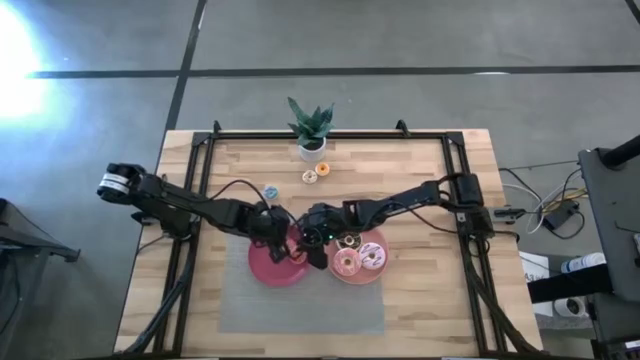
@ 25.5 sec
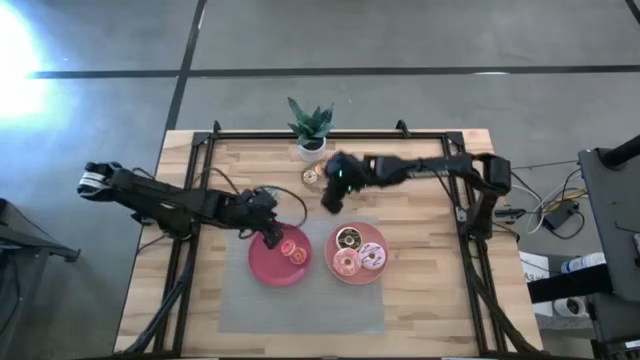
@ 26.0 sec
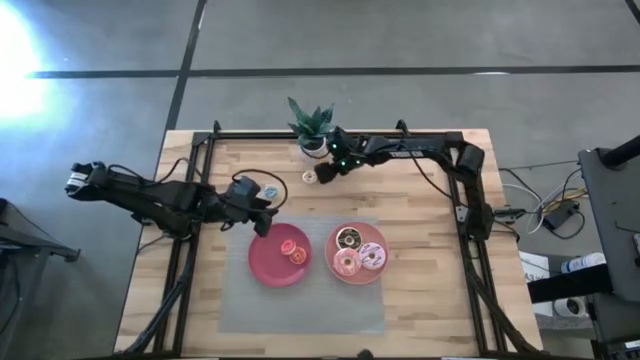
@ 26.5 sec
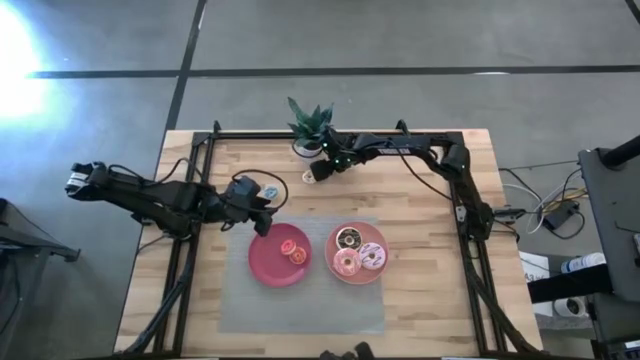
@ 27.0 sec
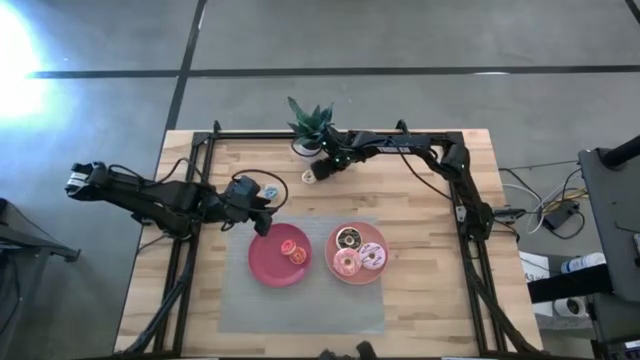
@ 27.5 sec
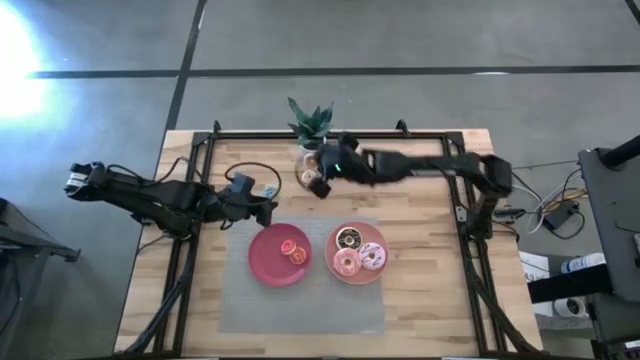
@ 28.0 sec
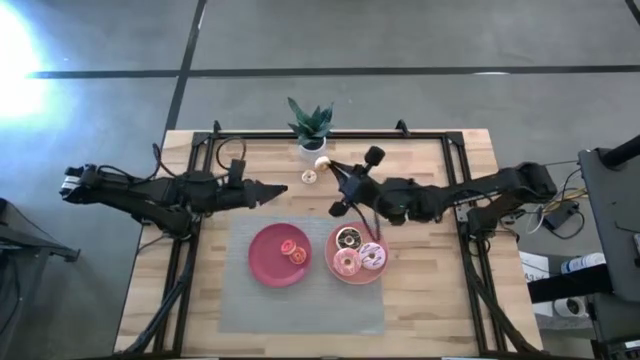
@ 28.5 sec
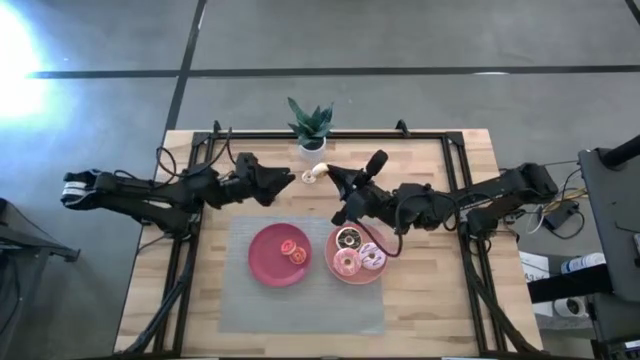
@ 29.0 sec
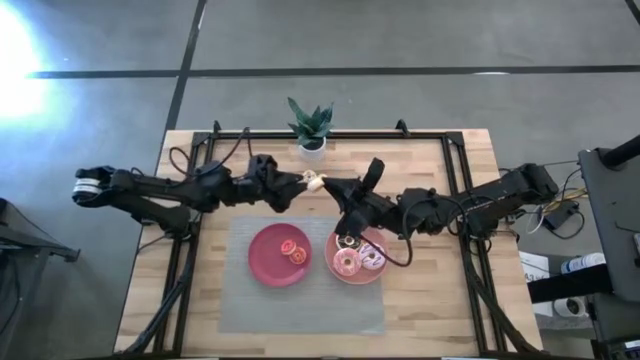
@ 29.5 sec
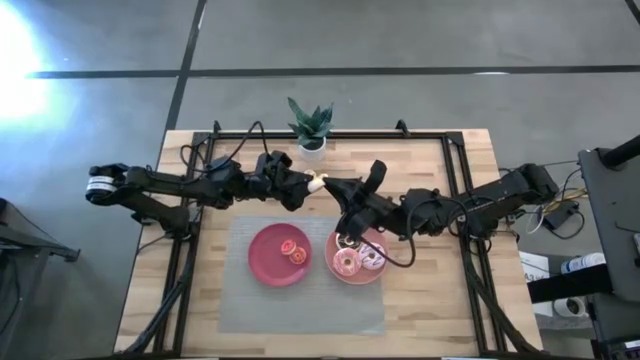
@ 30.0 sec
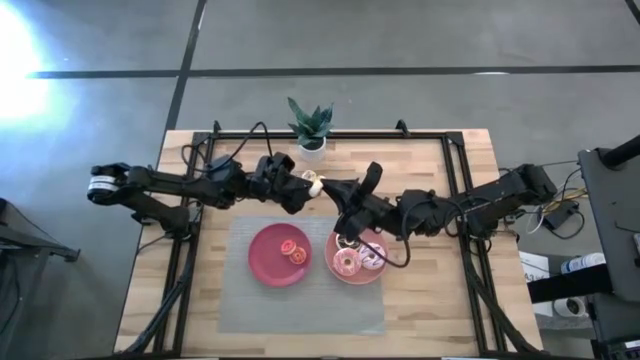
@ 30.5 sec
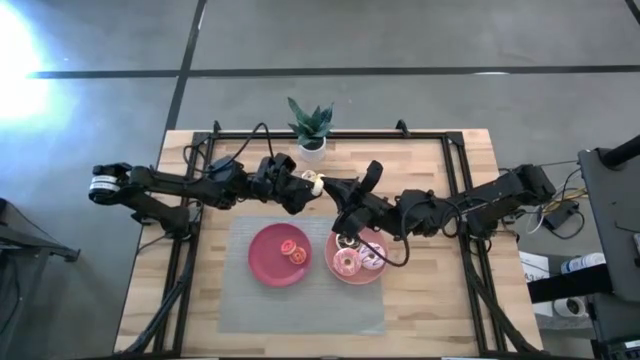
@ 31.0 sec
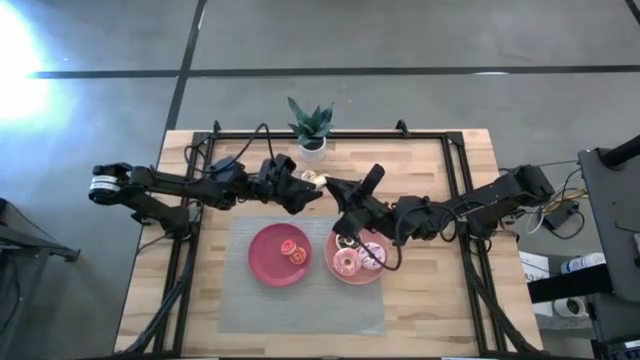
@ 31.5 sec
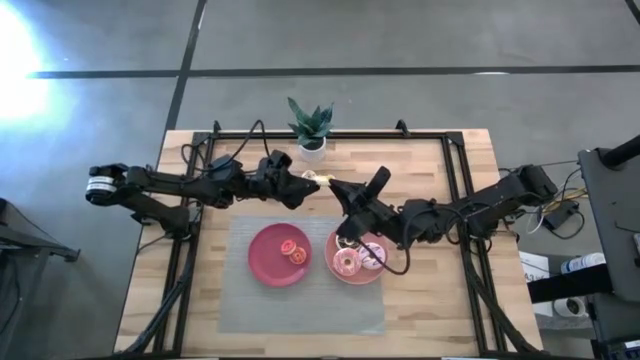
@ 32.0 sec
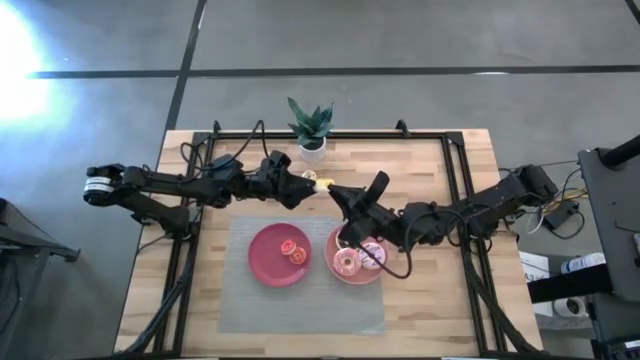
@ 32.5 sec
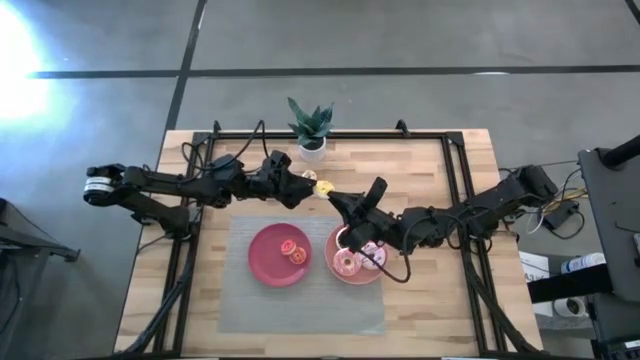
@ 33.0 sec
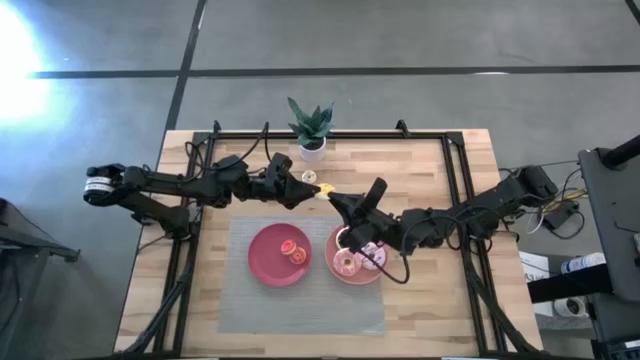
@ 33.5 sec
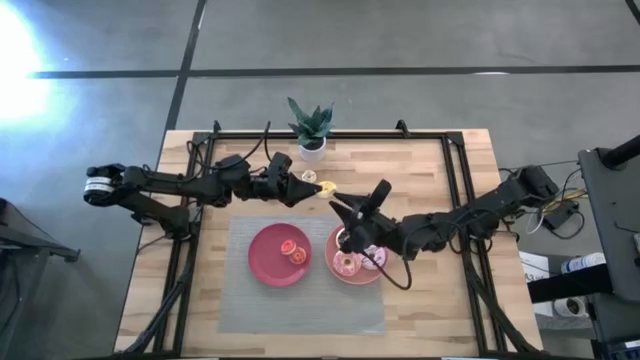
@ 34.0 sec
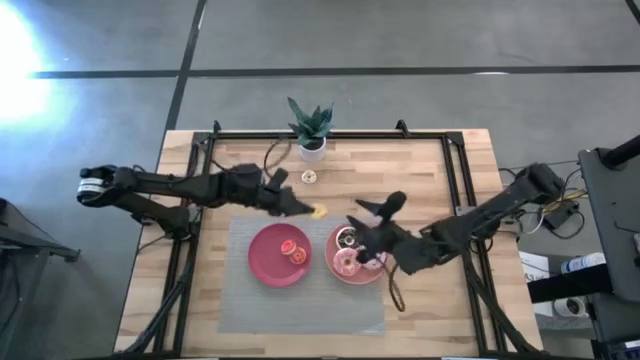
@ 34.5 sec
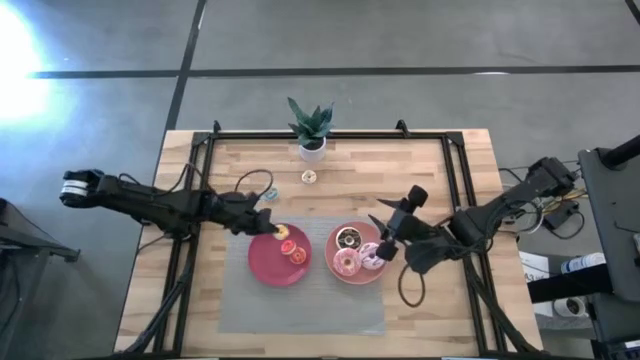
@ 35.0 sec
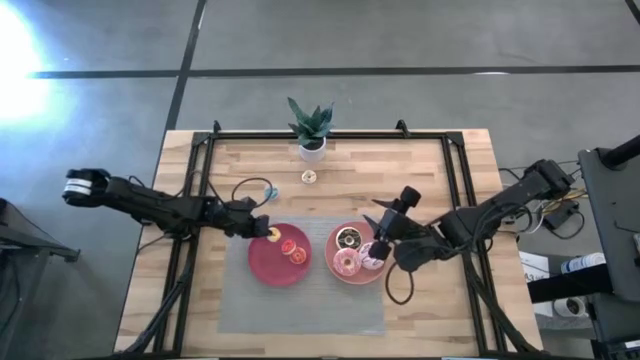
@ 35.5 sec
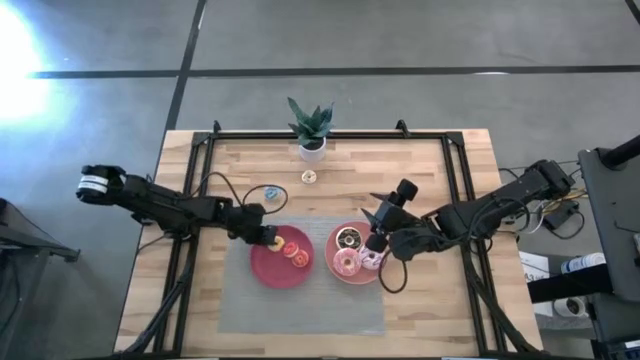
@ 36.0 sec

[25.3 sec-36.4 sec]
Task: Pick & Place donuts
Put the small yellow donut on the pink plate

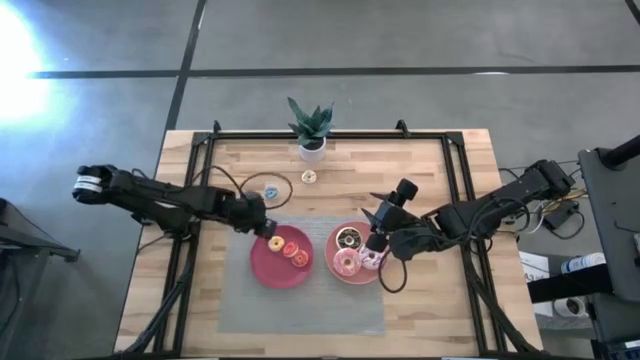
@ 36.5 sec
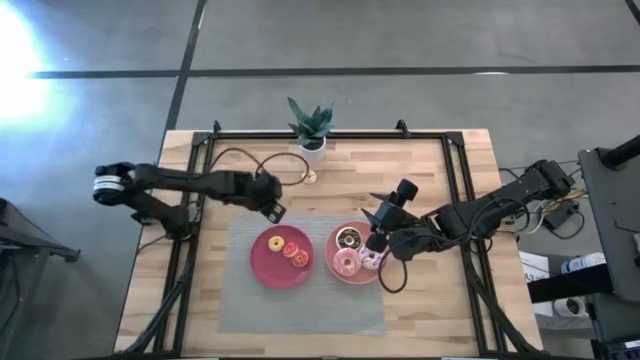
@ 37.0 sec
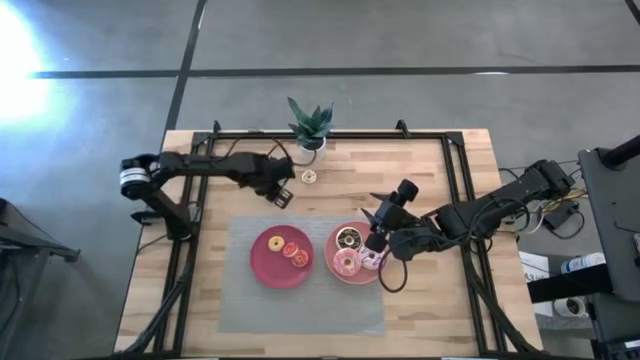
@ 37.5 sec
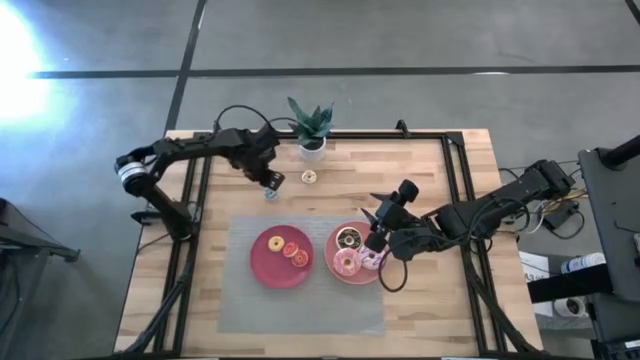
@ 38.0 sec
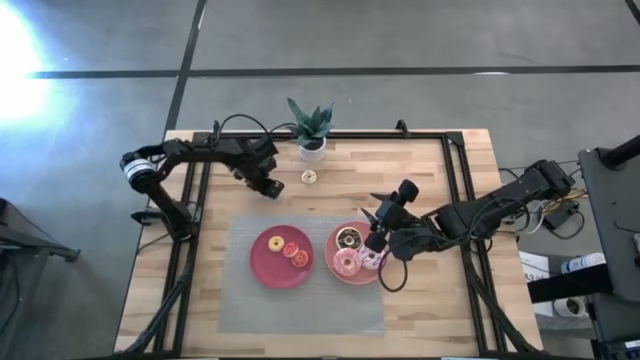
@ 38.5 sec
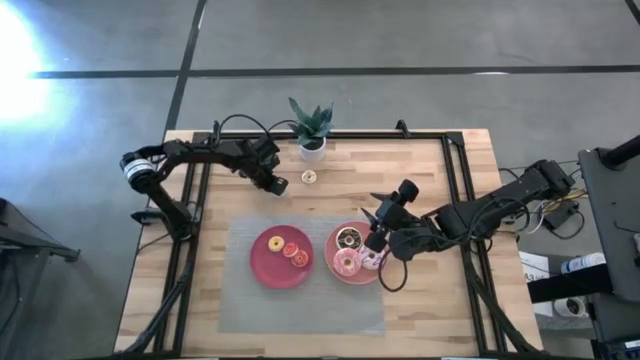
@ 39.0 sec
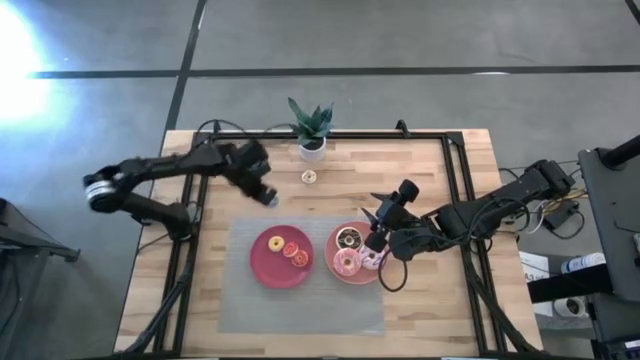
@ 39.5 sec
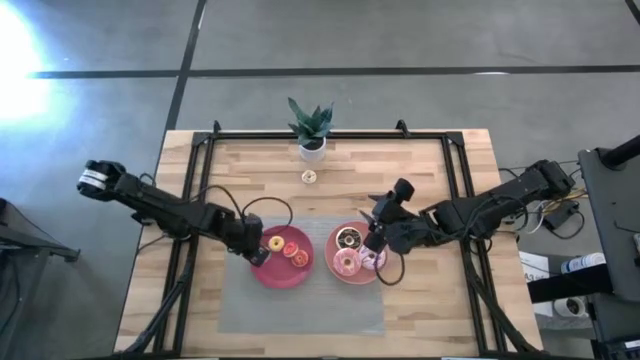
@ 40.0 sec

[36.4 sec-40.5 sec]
Put the small blue donut on the pink plate

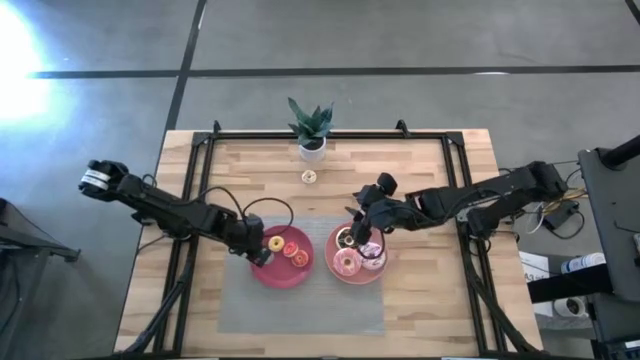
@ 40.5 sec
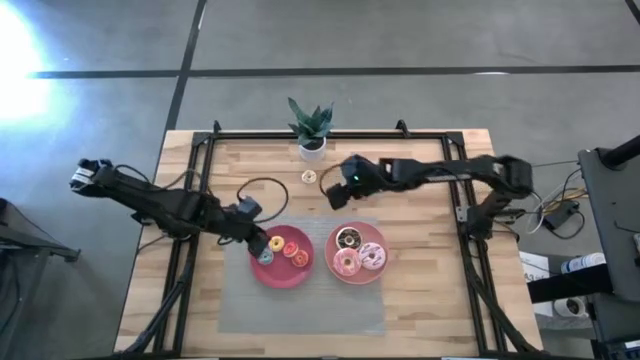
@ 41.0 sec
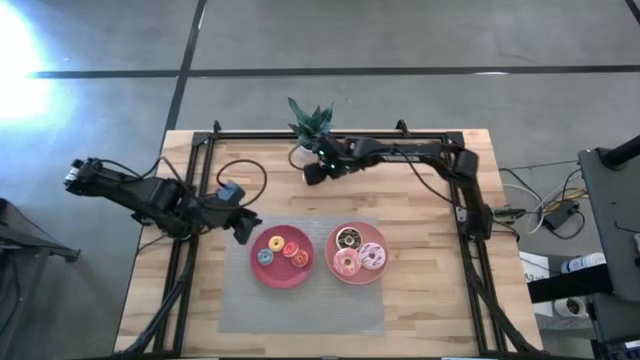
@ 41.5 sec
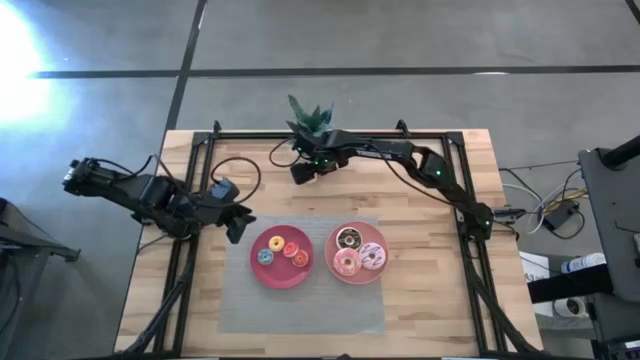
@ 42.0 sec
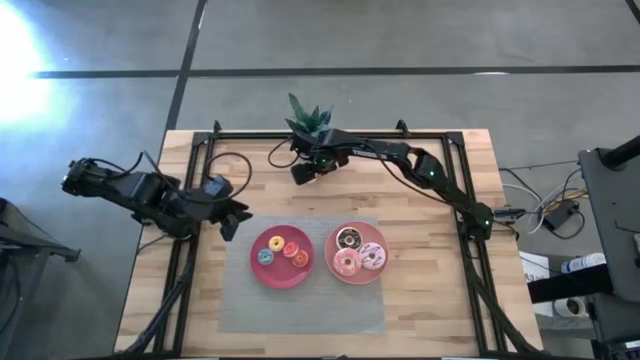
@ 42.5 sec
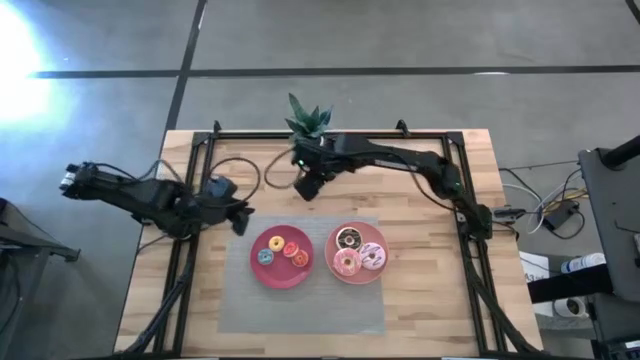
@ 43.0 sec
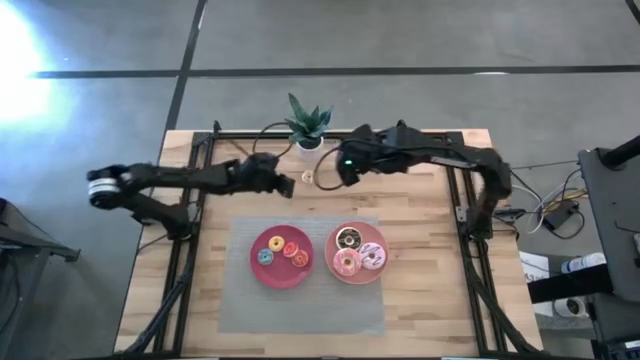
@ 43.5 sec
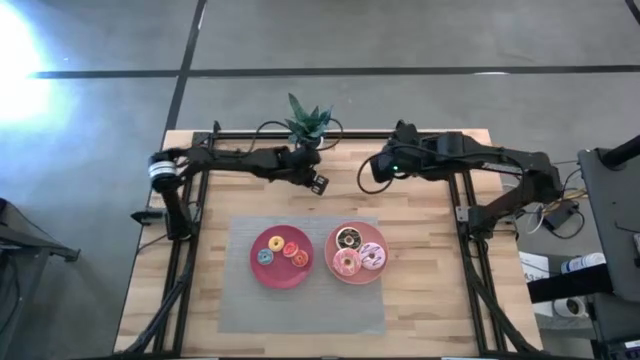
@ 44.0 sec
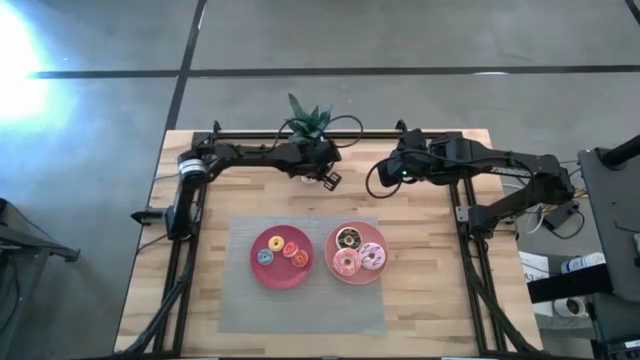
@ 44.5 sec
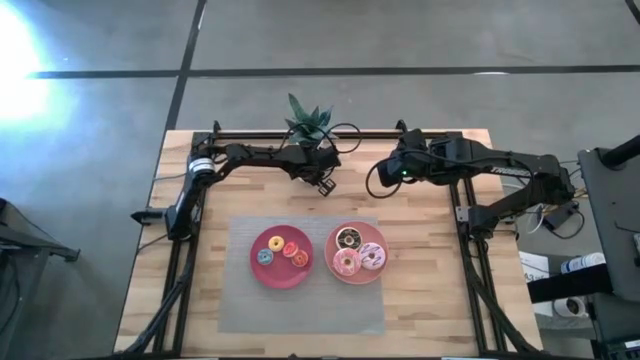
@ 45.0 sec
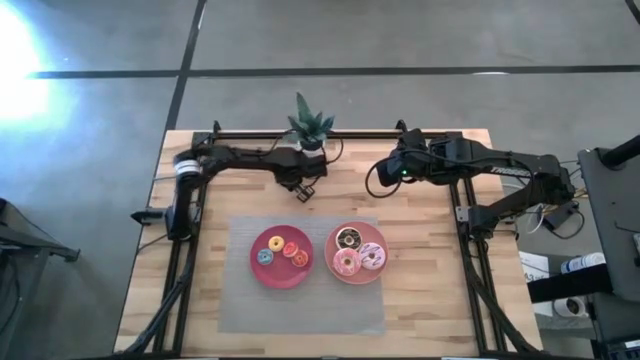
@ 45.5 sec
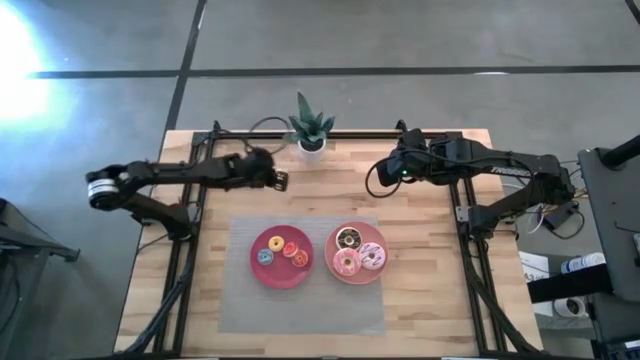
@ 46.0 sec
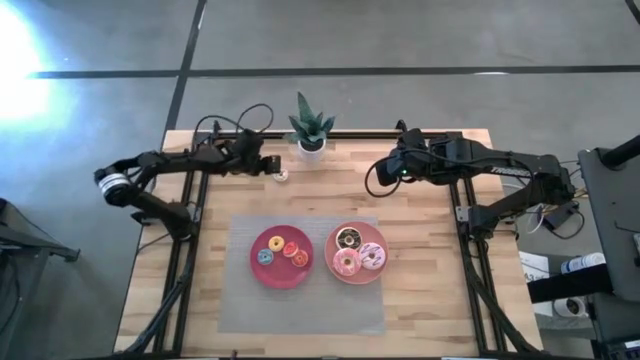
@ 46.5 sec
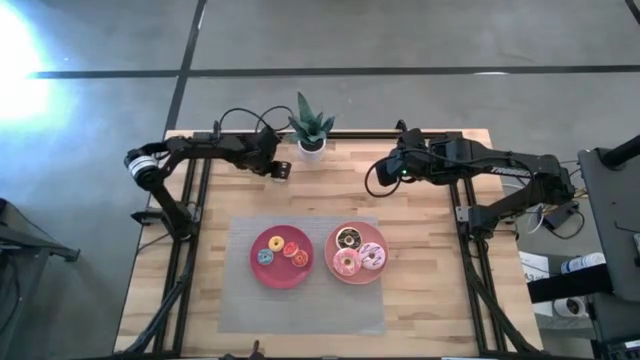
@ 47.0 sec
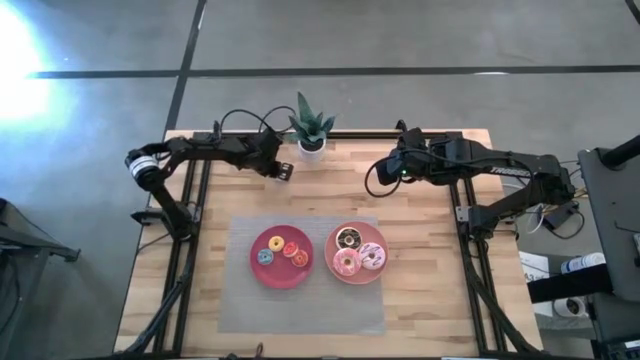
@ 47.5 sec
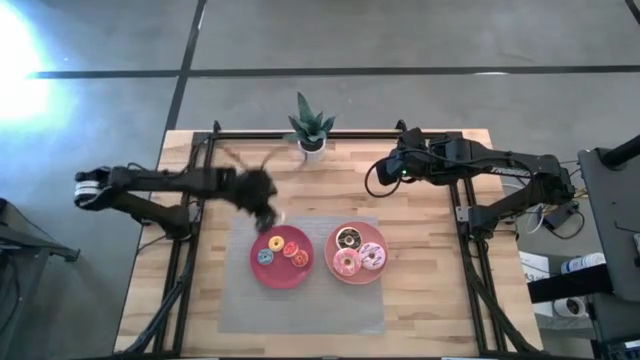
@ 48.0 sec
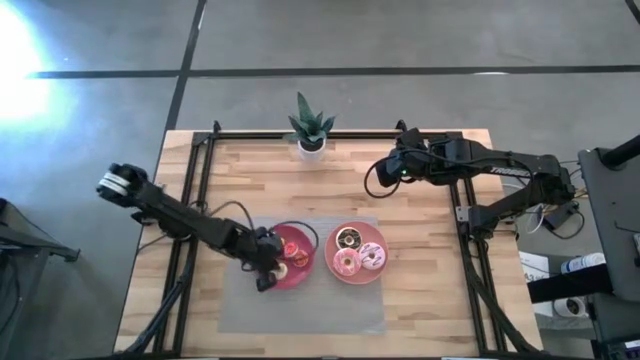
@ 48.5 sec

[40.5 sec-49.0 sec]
Put the small white donut on the pink plate
